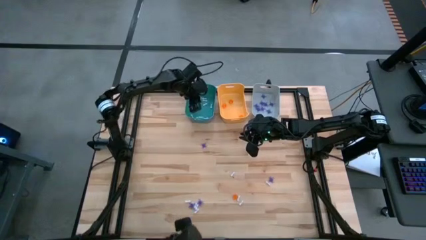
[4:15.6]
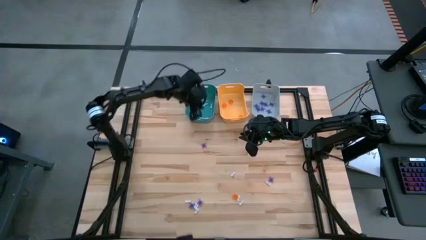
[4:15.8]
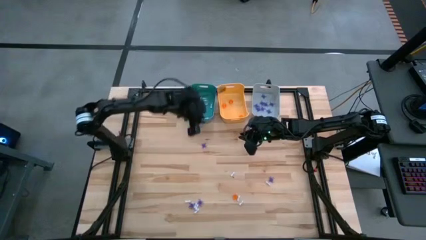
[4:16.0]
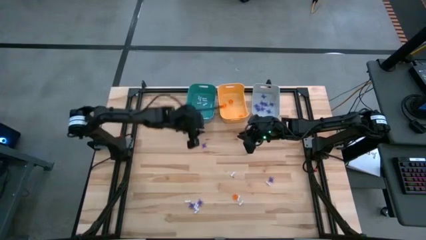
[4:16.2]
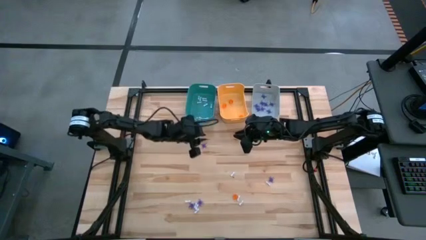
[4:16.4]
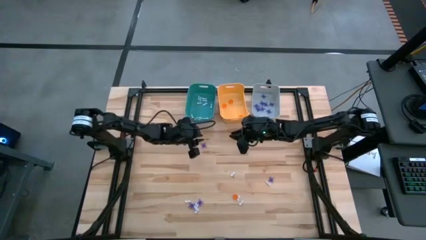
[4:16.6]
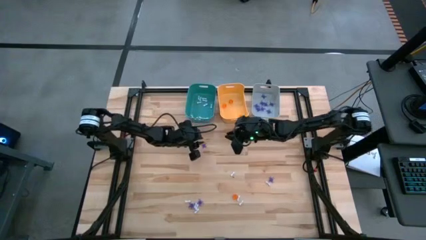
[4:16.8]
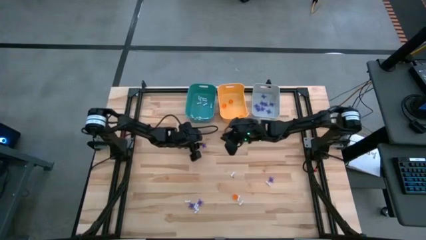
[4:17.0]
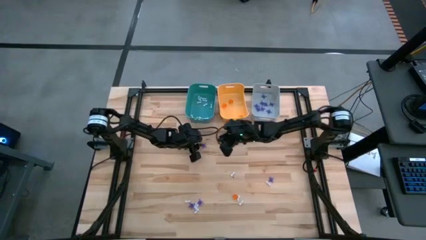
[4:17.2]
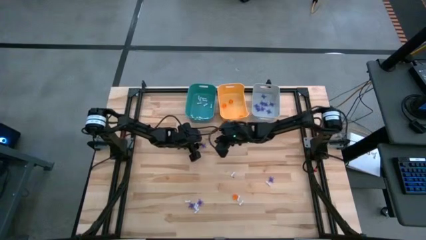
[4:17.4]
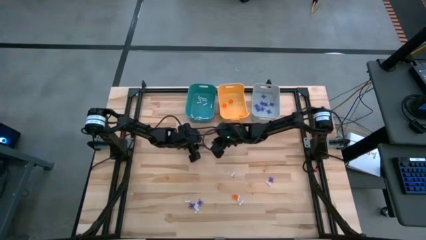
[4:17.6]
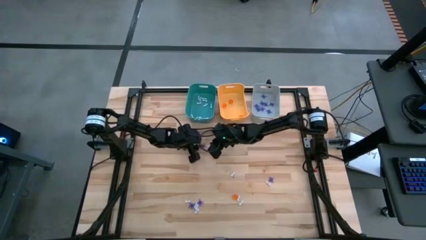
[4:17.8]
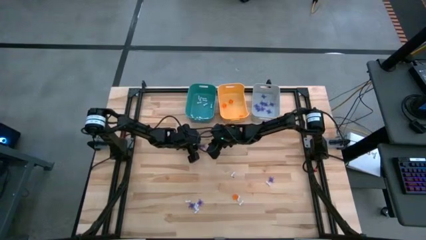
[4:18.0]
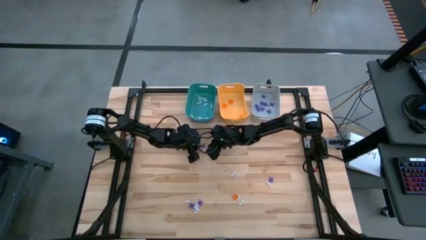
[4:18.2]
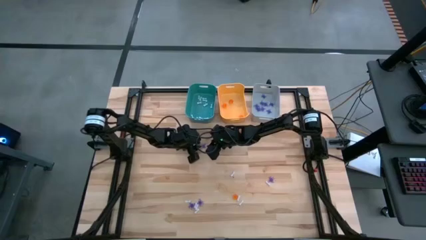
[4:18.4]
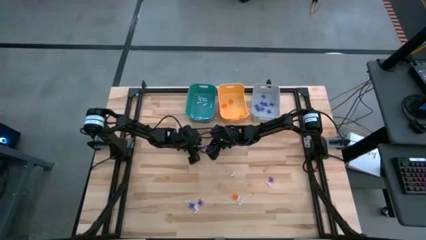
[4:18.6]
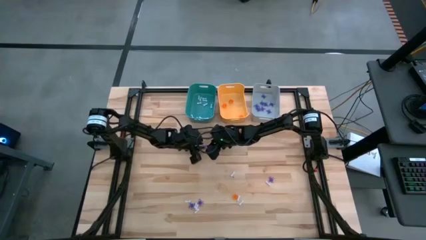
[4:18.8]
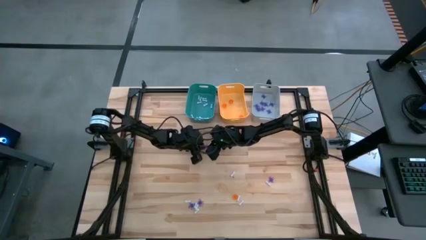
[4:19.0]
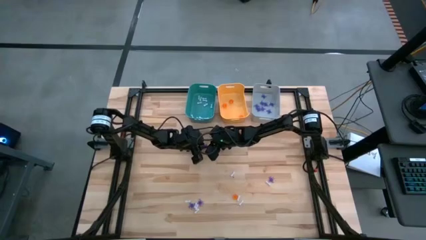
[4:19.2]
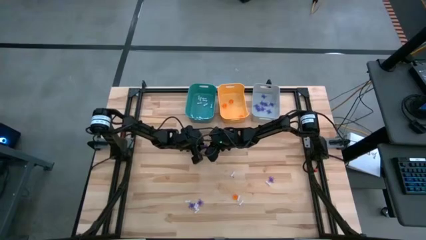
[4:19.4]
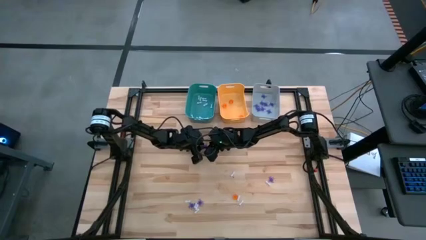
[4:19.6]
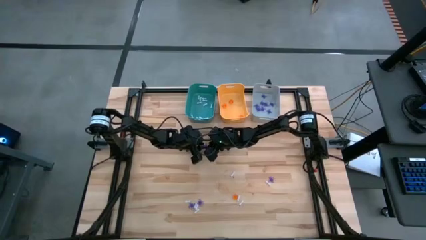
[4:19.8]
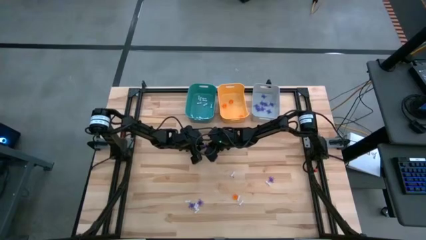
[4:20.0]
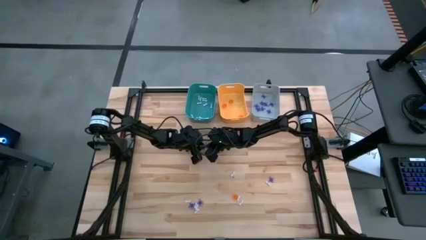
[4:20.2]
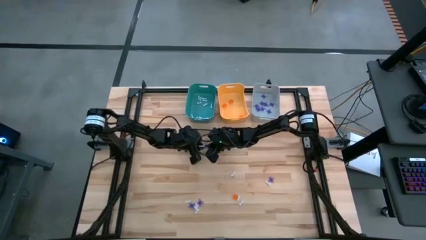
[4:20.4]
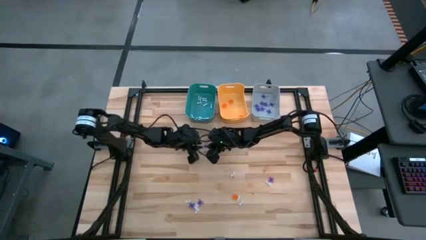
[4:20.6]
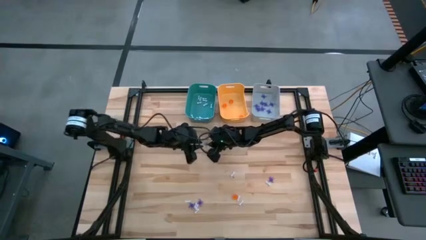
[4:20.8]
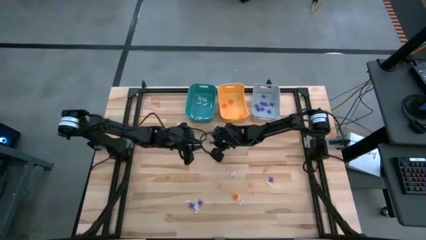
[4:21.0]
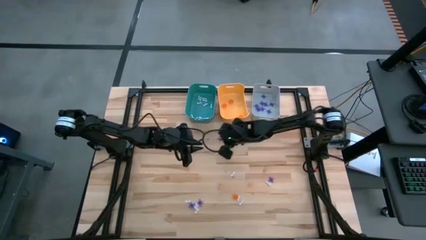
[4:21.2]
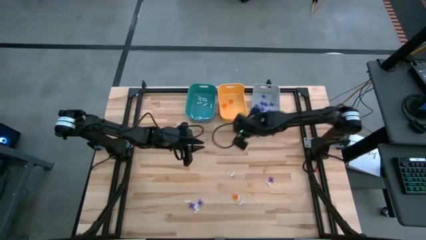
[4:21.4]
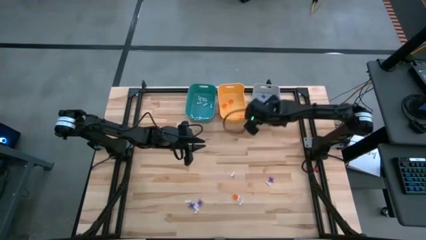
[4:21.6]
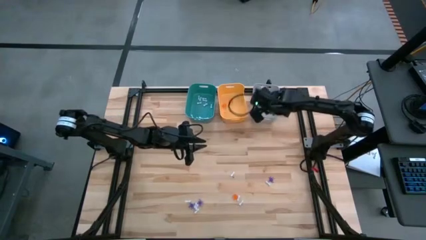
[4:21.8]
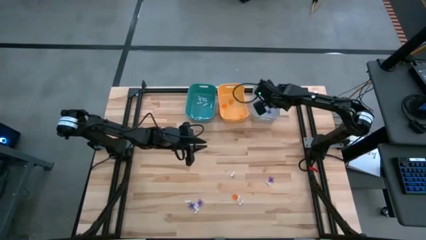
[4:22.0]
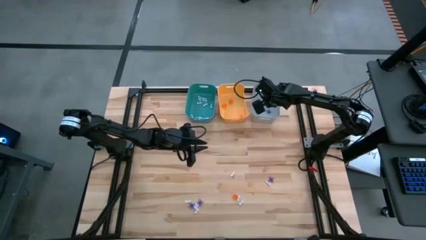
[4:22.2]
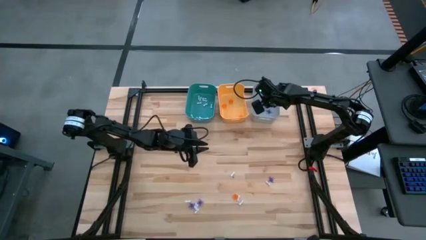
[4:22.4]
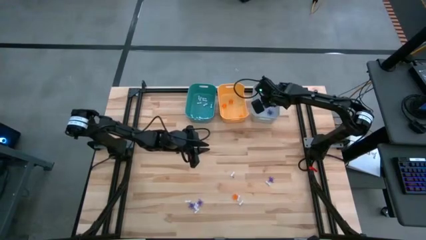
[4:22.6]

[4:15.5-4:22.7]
Task: Sort Halloween decoration
Put the purple spider toy into the gray bin

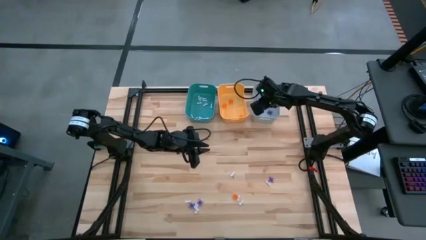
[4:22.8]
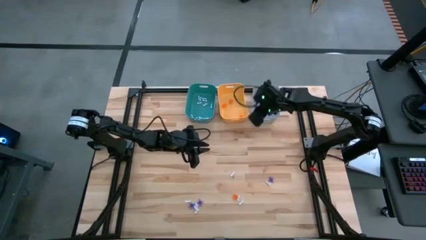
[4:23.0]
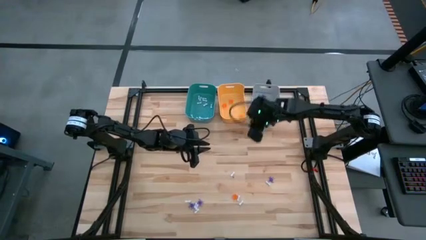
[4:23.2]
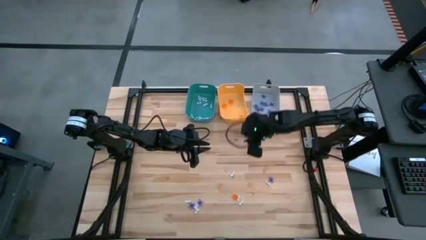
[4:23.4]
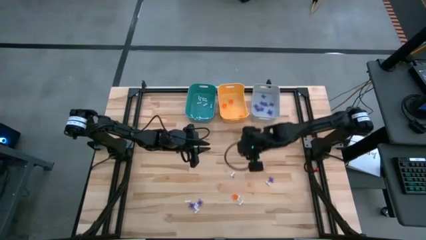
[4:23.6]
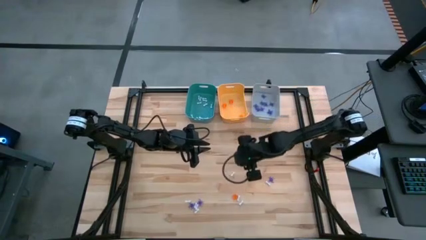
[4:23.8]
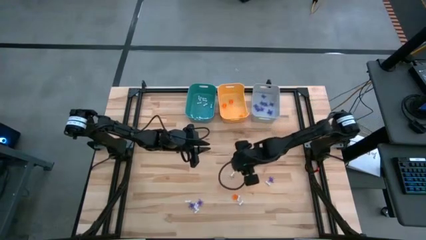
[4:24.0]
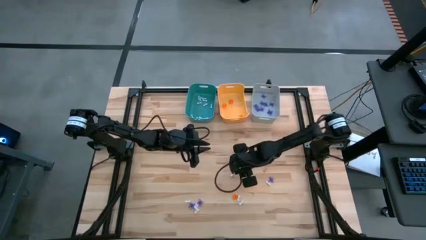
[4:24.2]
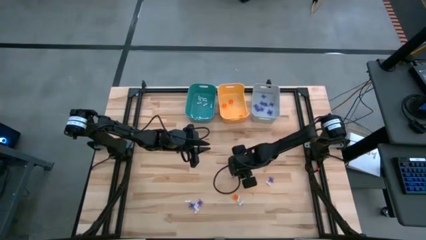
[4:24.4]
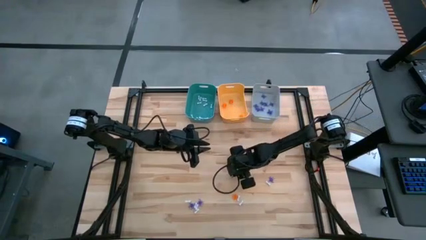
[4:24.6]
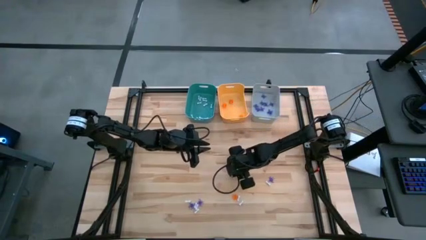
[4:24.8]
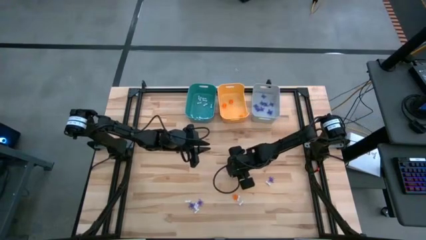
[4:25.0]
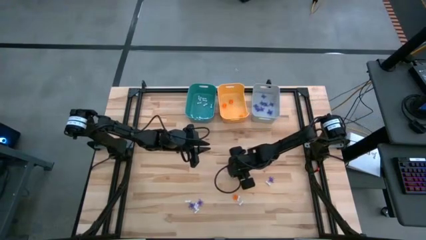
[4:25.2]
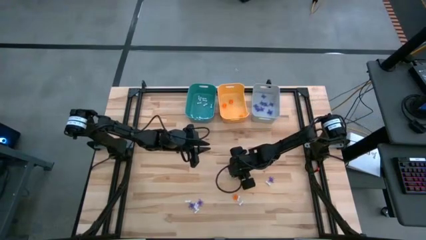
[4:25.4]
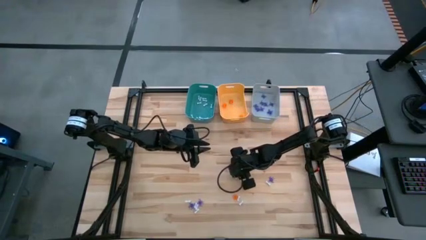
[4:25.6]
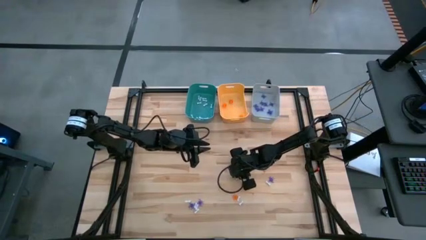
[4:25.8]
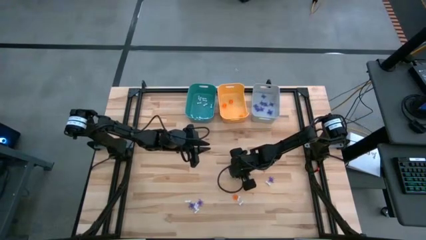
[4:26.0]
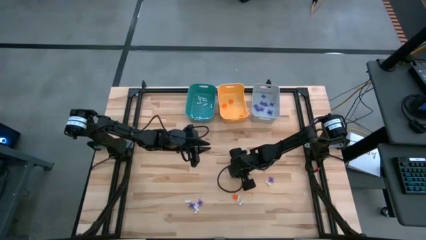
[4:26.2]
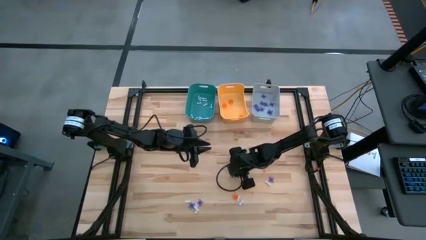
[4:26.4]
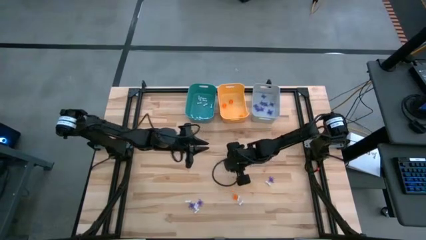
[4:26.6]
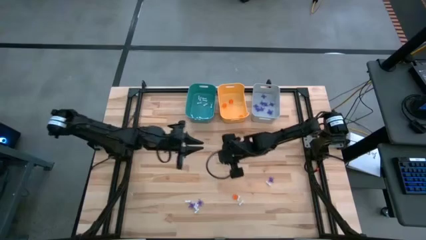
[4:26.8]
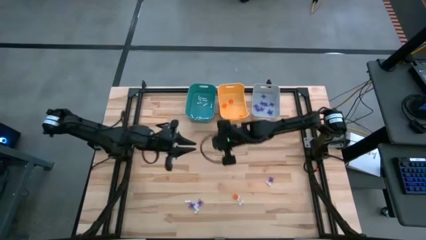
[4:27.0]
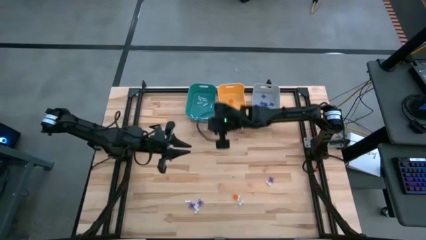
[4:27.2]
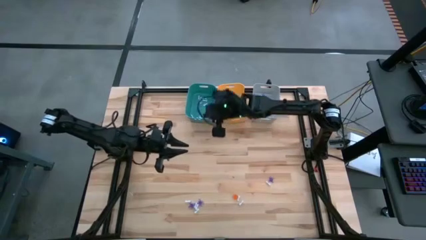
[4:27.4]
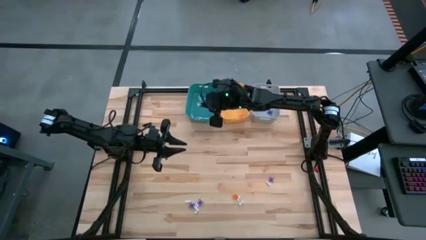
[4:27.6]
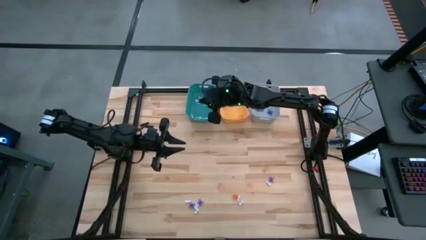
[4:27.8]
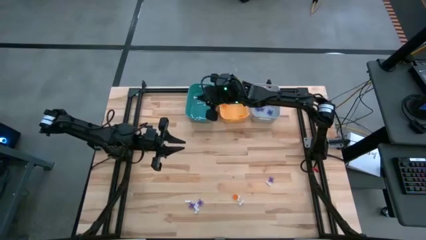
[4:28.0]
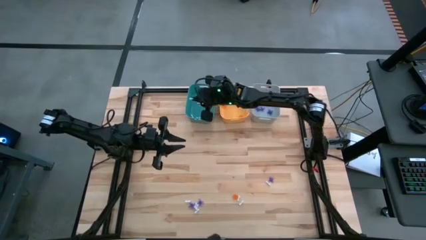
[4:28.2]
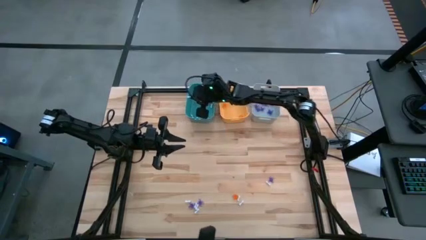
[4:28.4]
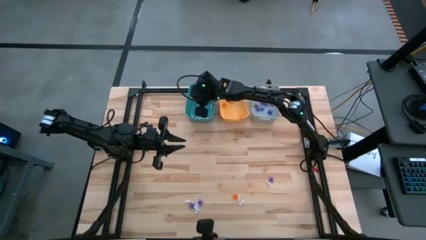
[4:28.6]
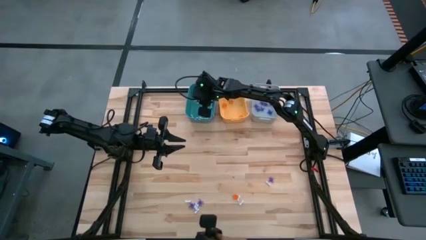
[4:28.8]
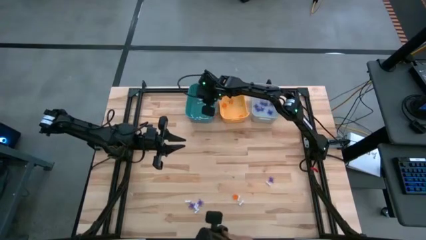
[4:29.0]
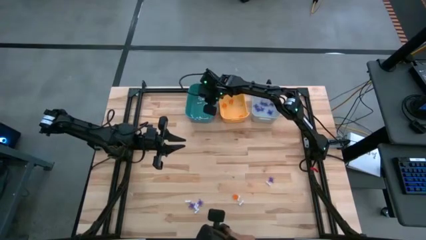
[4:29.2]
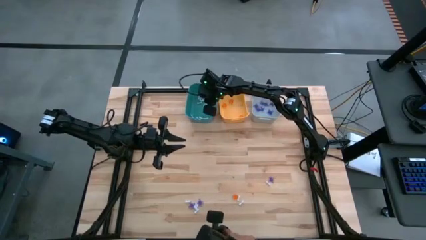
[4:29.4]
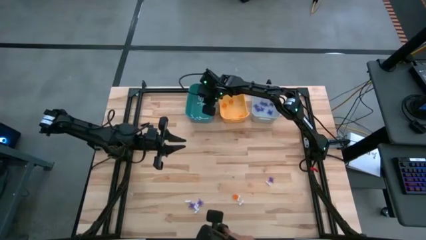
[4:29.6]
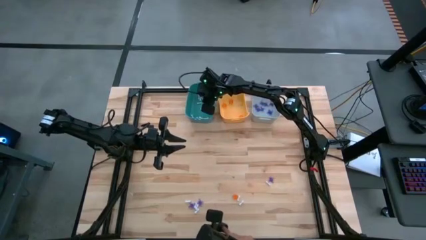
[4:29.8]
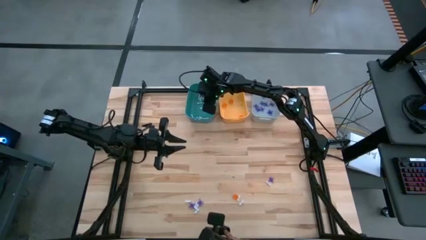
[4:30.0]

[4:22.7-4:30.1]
Put the white bone toy into the blue bin
